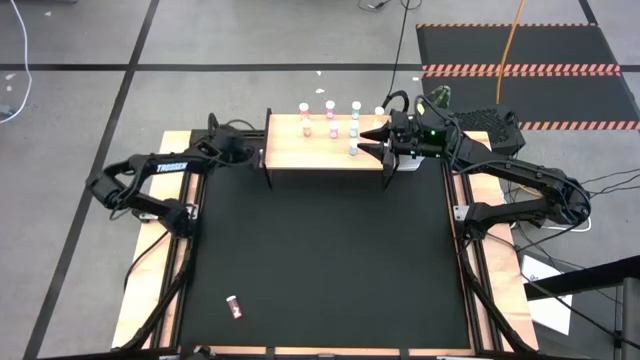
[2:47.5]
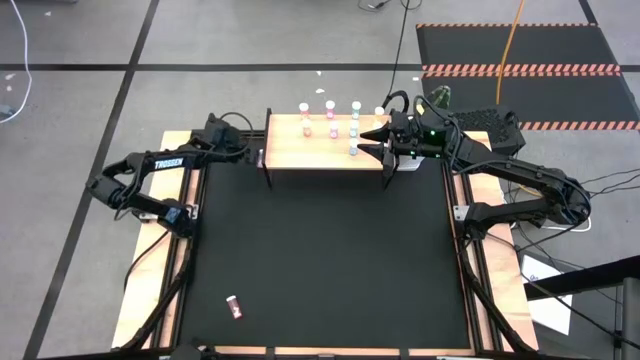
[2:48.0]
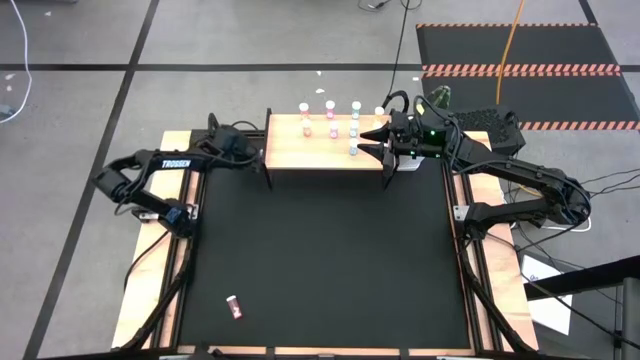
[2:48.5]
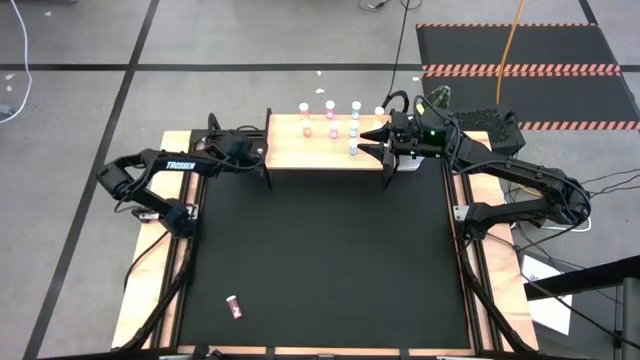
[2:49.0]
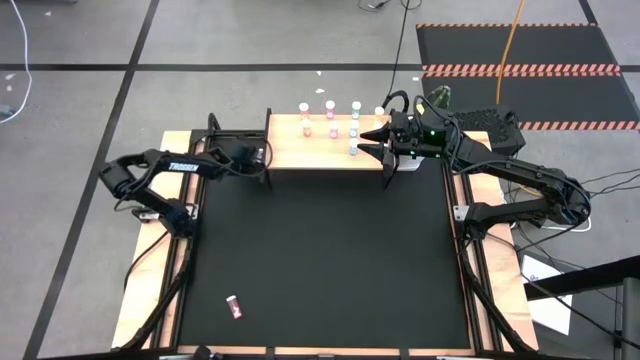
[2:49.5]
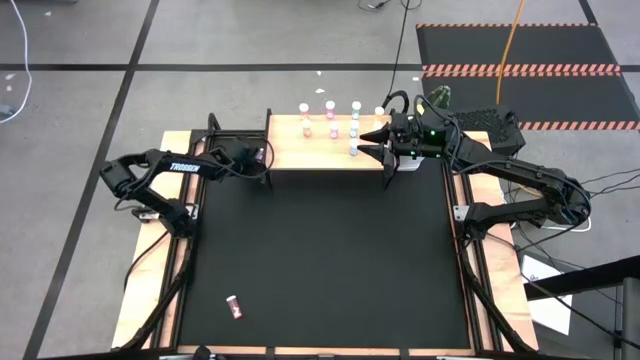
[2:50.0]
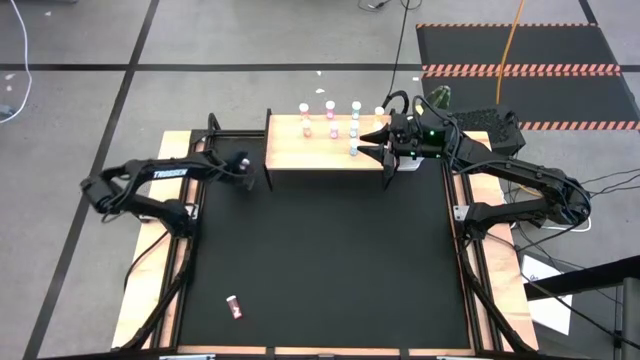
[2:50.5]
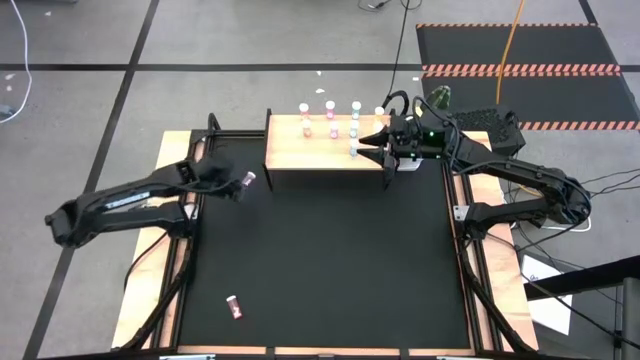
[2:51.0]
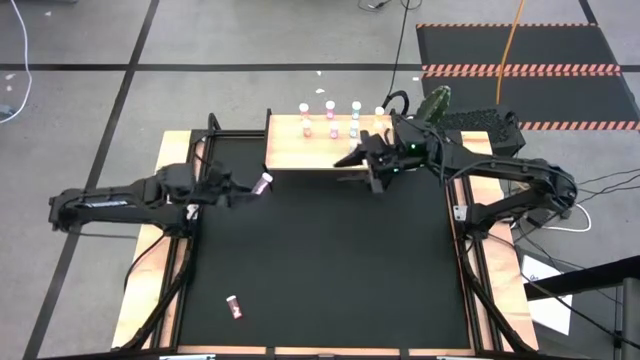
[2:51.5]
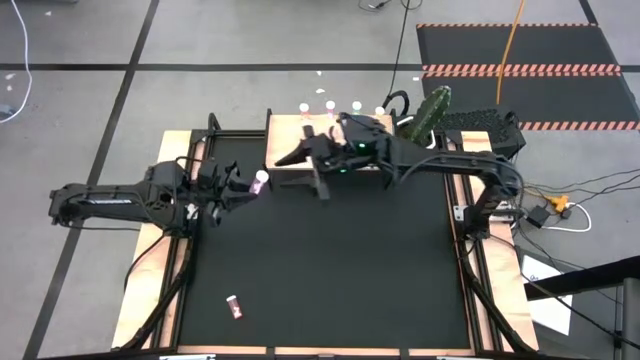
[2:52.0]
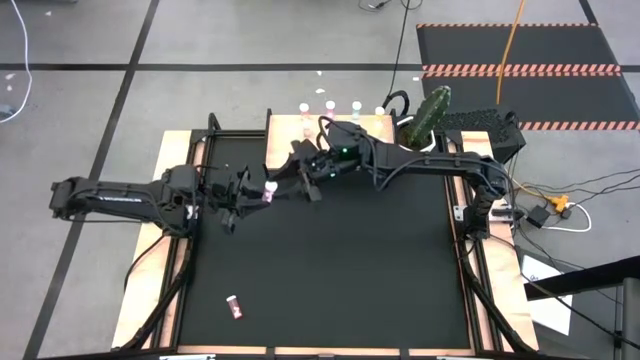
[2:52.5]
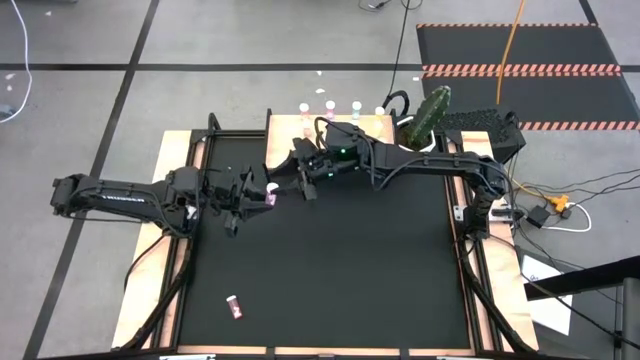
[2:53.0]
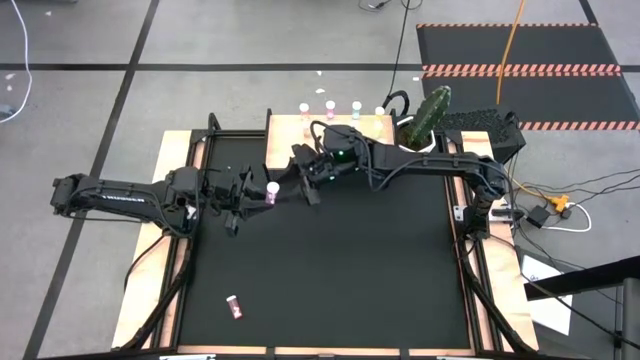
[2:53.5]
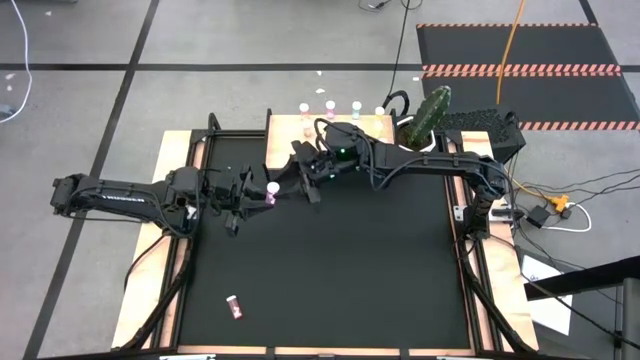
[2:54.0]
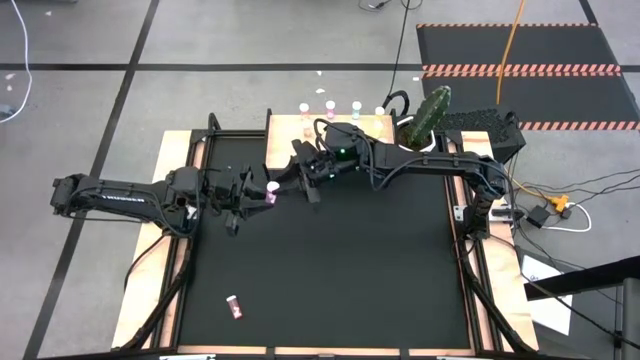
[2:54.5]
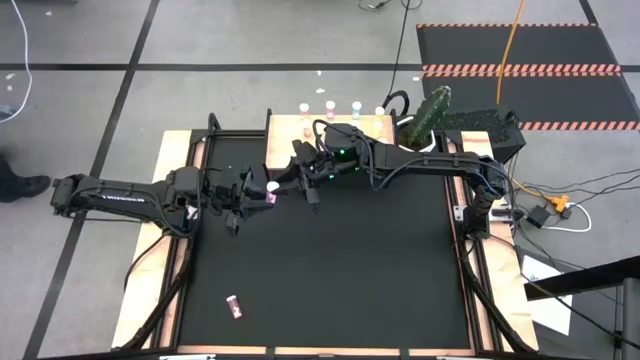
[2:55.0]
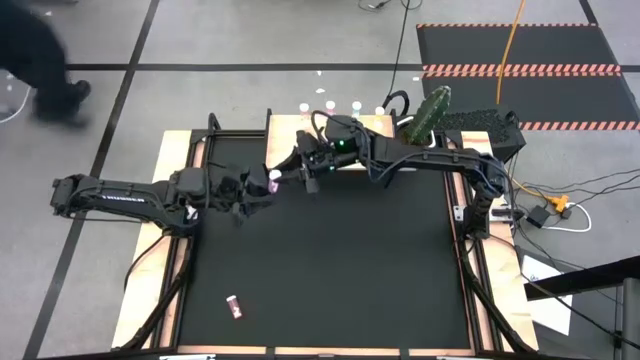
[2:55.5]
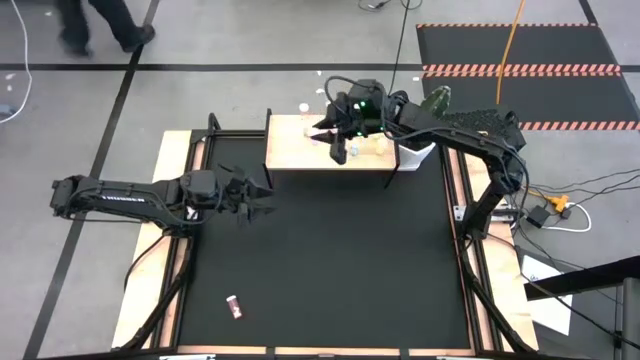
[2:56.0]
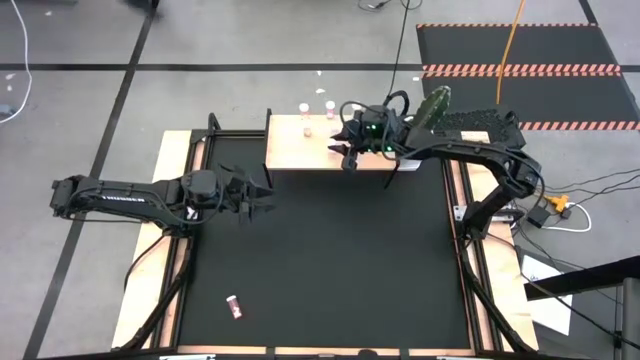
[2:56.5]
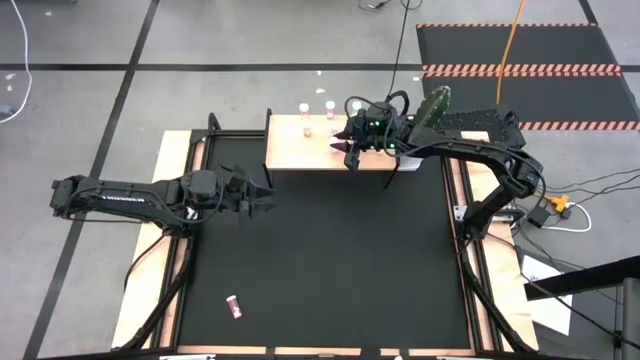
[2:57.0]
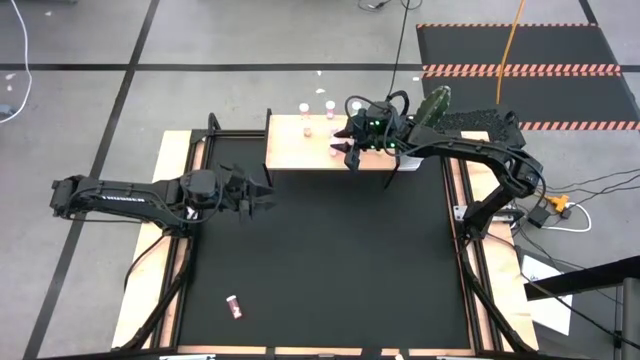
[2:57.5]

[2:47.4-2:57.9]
Task: Pick and place medicine bottles onto shelf by color
Put the purple pill bottle on the shelf aligned with the other purple pill bottles

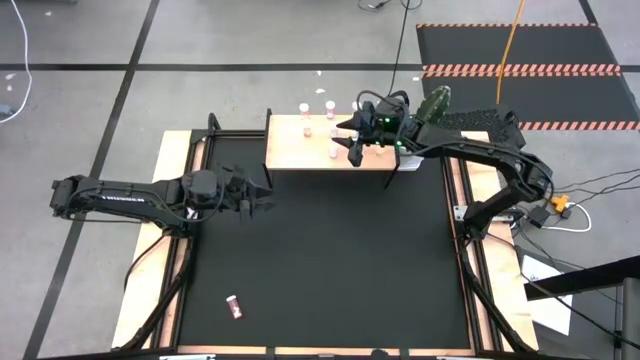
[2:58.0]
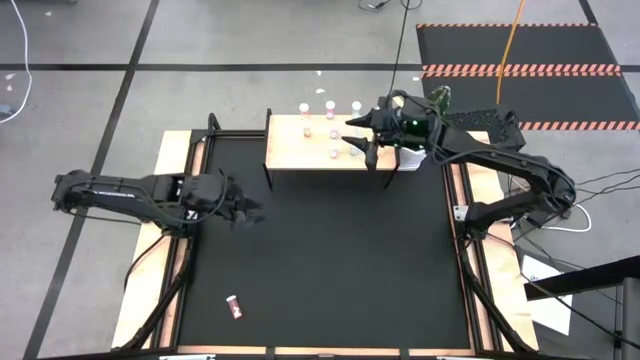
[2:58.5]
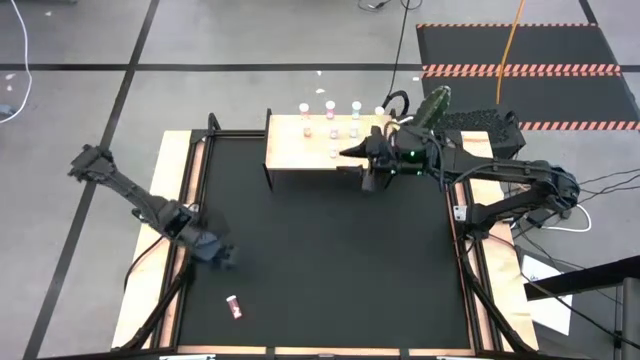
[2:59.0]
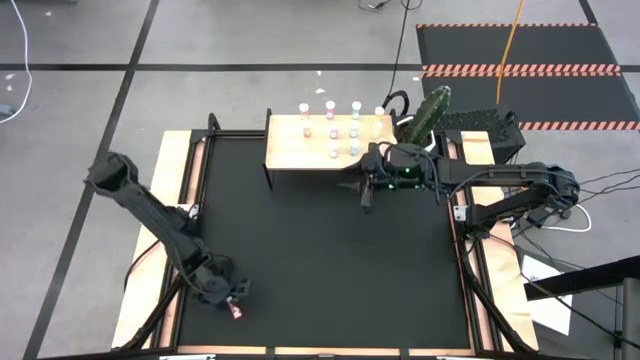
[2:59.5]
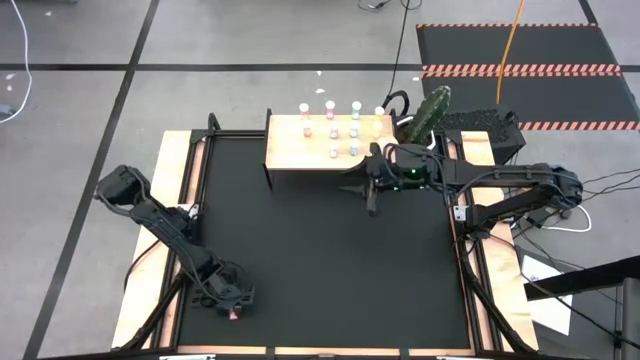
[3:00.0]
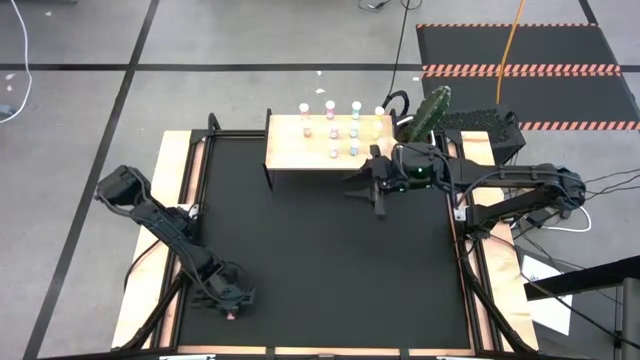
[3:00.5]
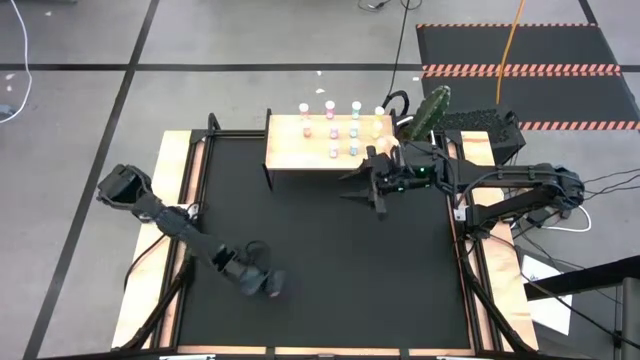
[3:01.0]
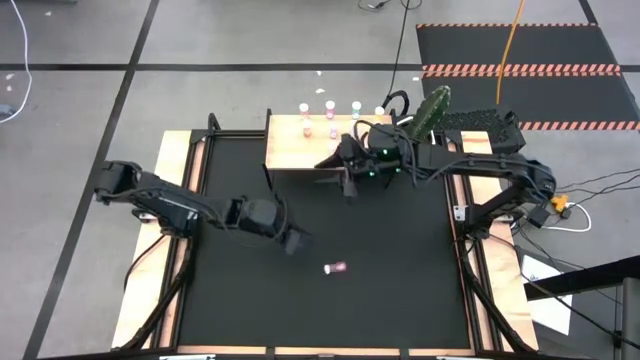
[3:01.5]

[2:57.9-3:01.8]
Put the red pill bottle on the shelf aligned with the other red pill bottles

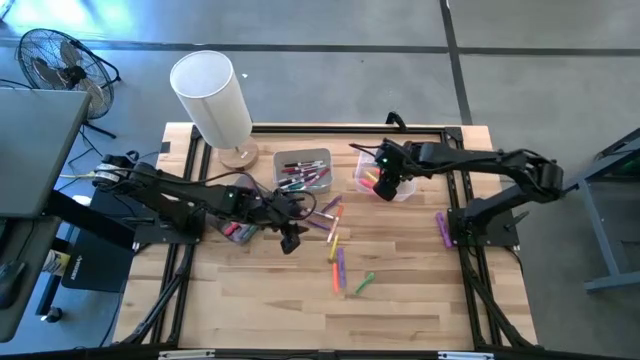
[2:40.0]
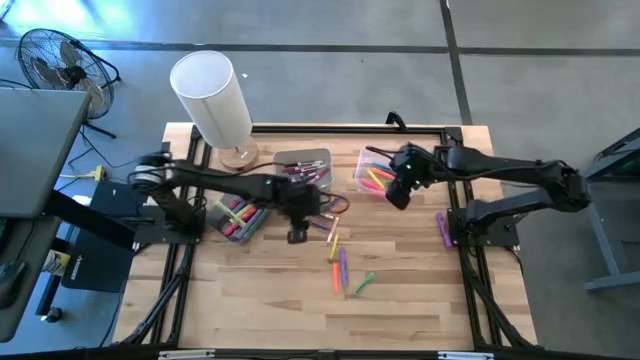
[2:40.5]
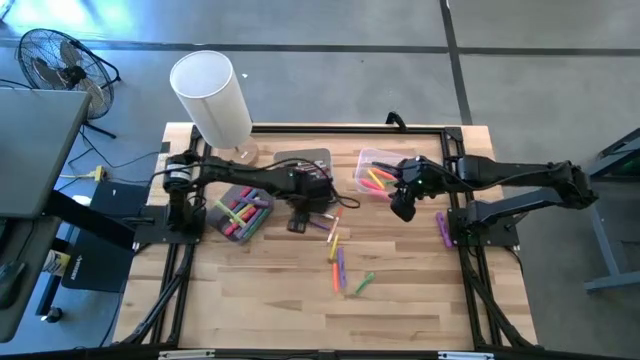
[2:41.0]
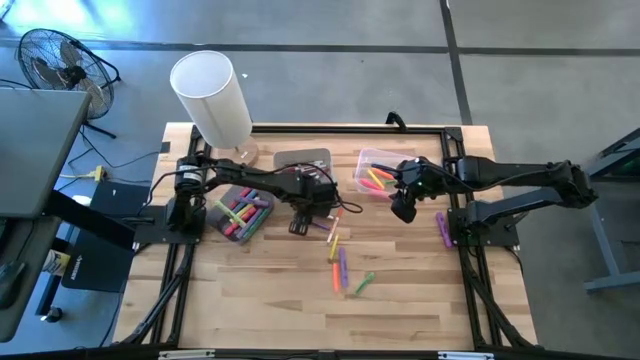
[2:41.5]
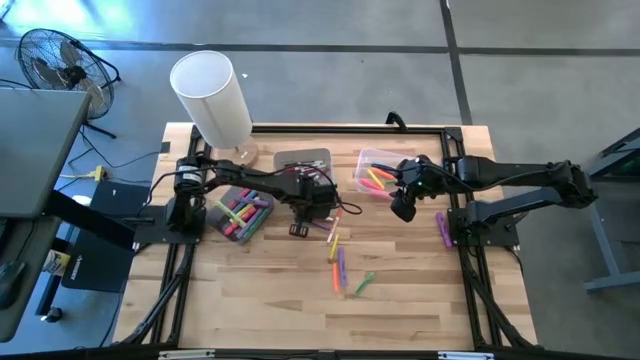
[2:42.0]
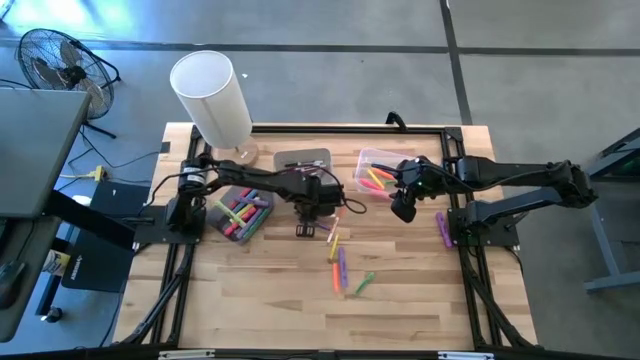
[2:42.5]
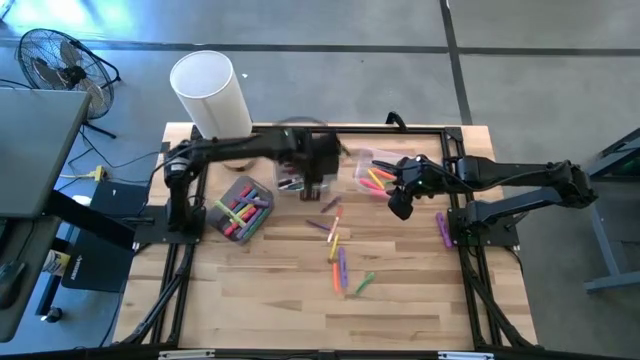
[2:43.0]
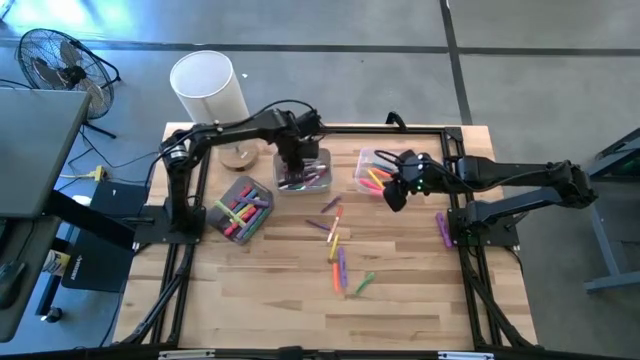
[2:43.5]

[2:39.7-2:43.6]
Task: Pick & Place Markers
Put the purple marker pen into the white bin

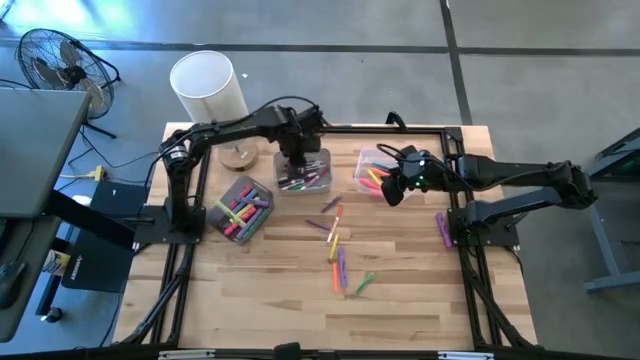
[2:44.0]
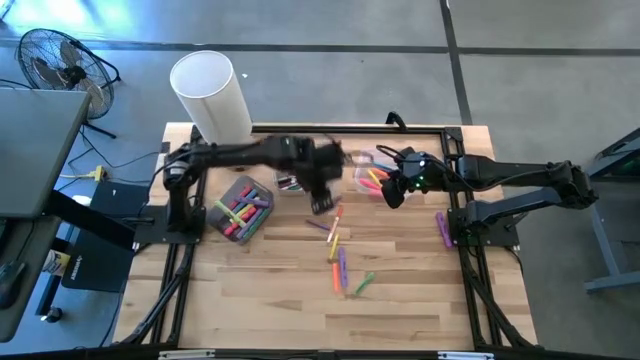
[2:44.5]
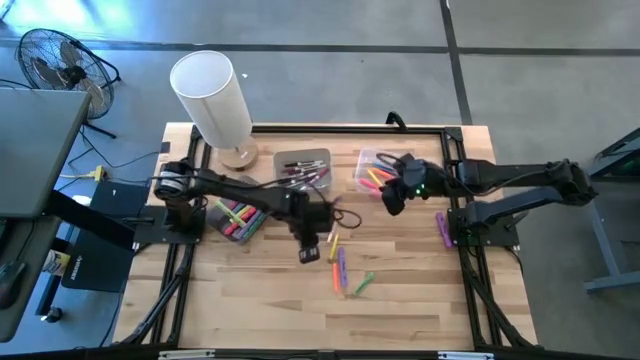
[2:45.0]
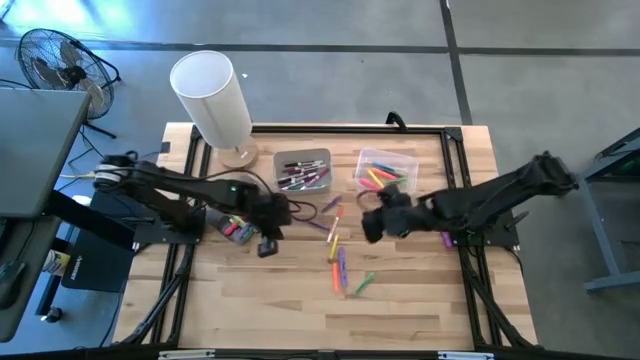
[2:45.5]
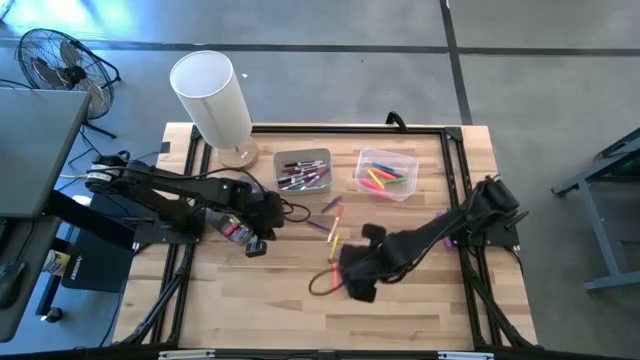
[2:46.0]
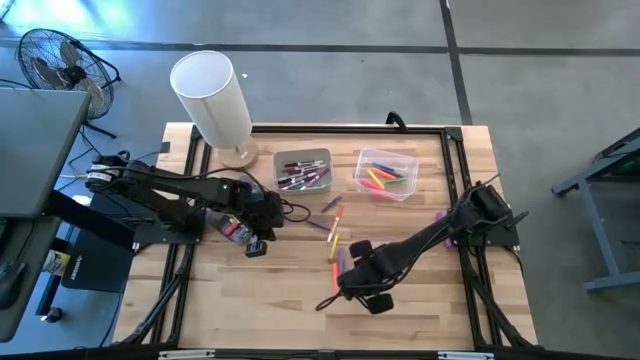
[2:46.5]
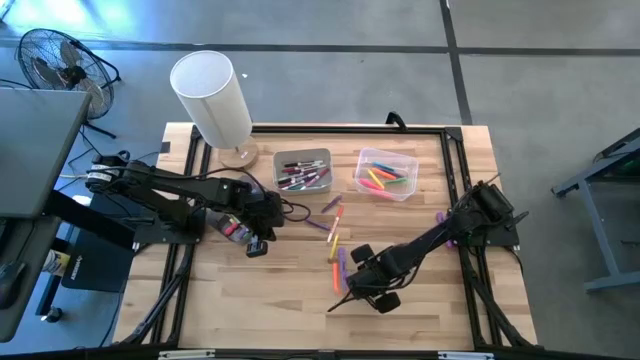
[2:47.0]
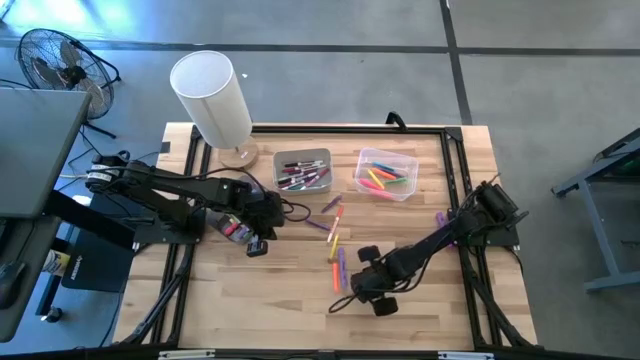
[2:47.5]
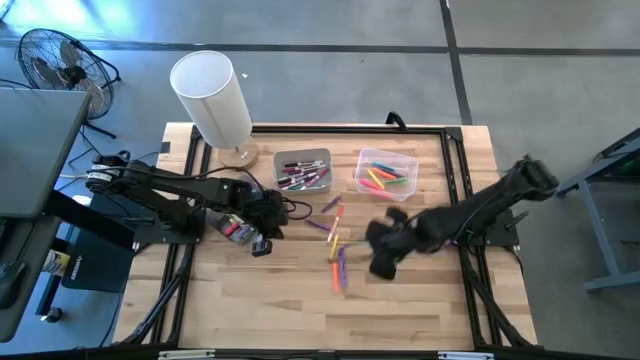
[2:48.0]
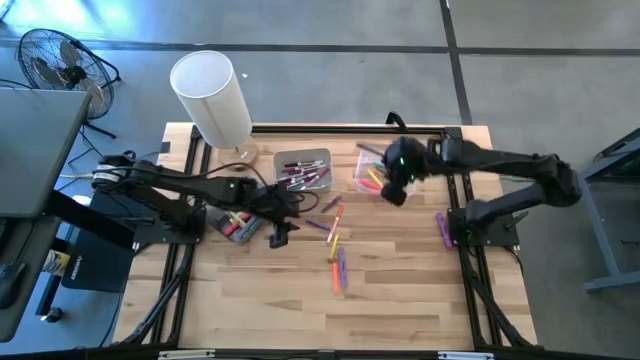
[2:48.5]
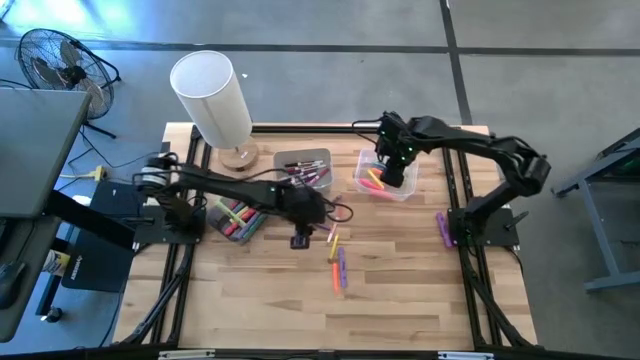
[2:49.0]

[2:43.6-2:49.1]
Put the green pen into the transparent bin
